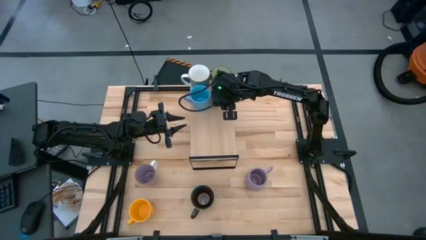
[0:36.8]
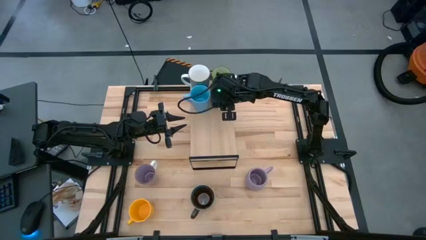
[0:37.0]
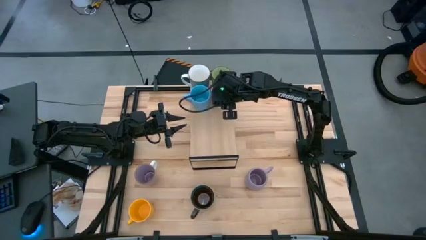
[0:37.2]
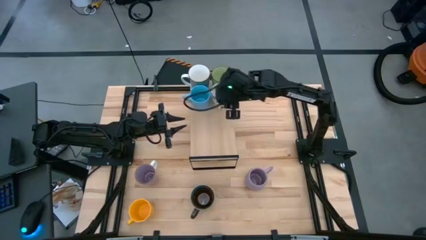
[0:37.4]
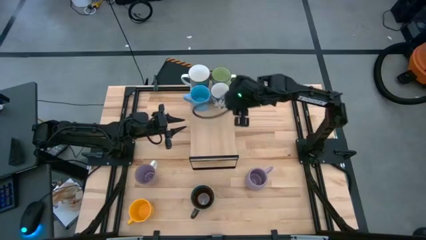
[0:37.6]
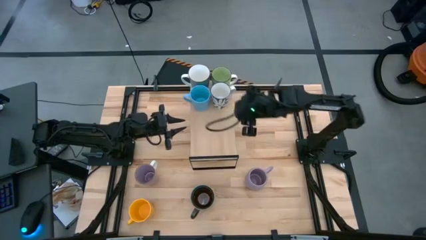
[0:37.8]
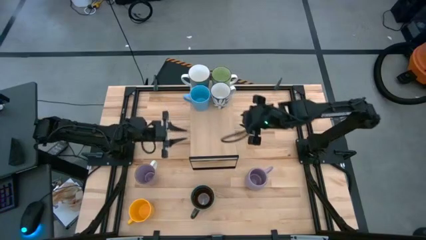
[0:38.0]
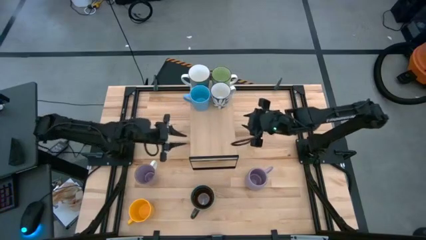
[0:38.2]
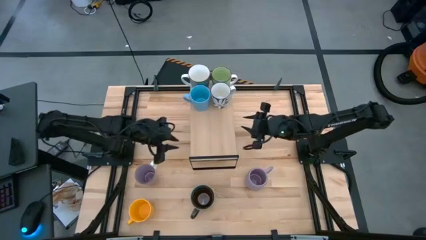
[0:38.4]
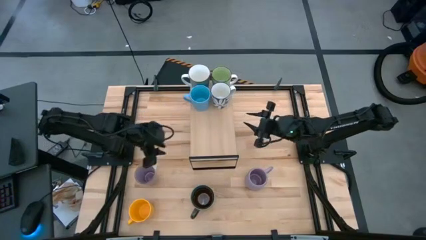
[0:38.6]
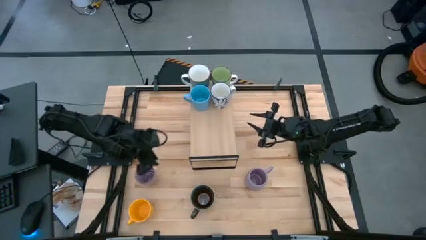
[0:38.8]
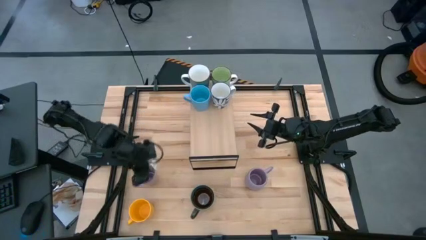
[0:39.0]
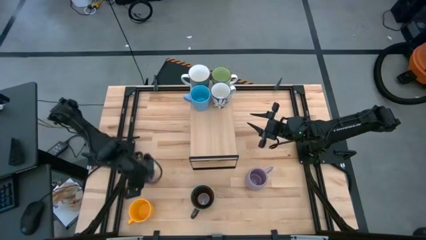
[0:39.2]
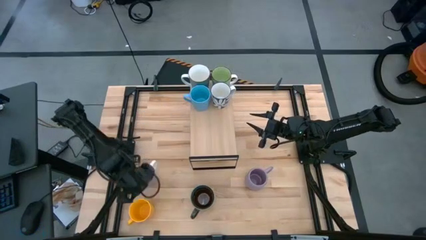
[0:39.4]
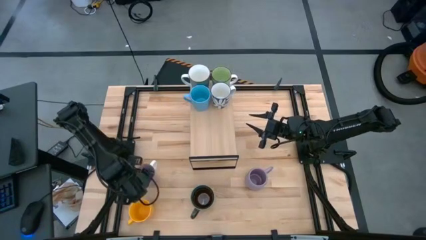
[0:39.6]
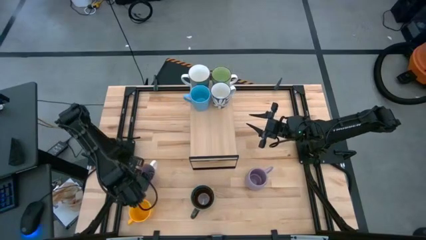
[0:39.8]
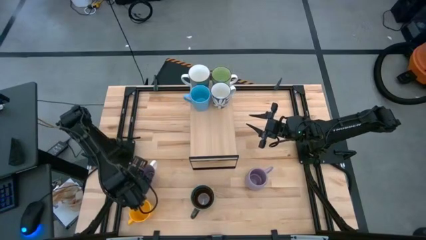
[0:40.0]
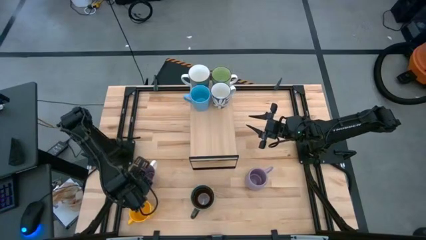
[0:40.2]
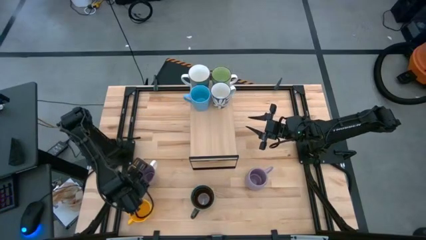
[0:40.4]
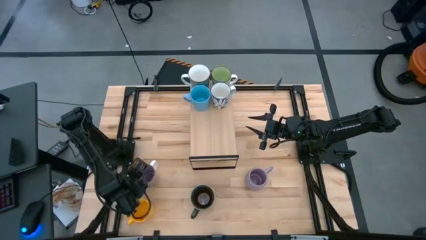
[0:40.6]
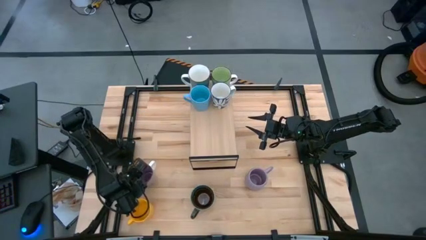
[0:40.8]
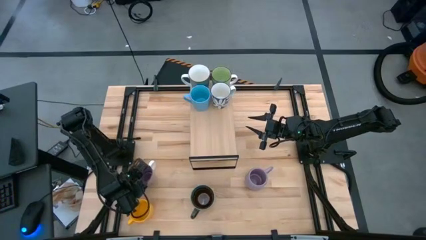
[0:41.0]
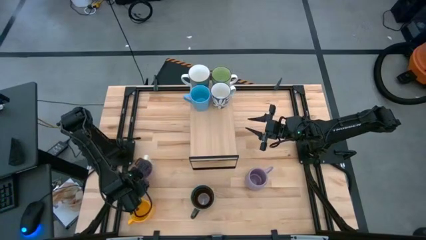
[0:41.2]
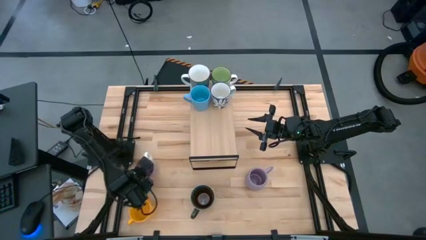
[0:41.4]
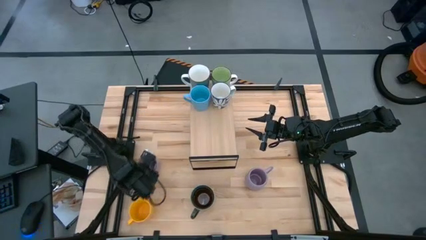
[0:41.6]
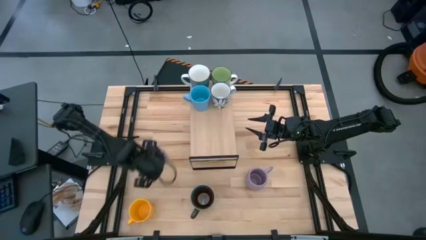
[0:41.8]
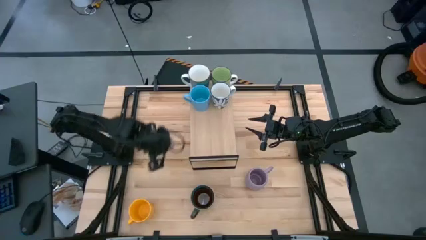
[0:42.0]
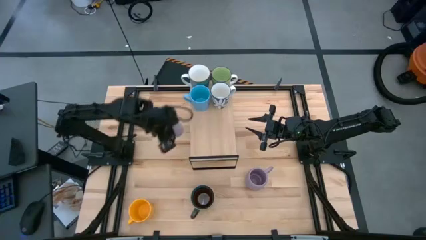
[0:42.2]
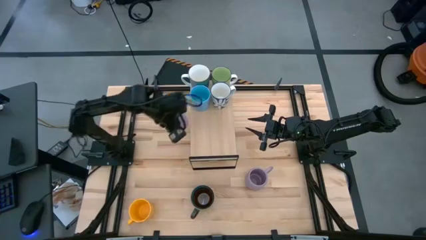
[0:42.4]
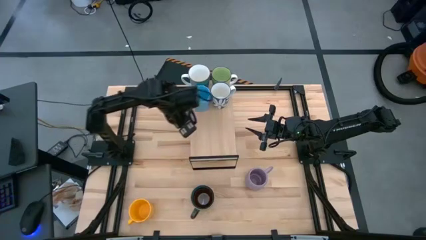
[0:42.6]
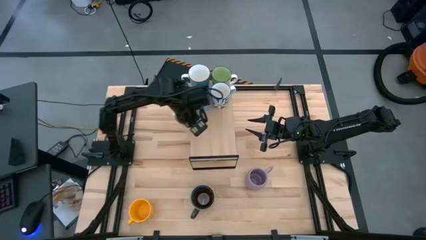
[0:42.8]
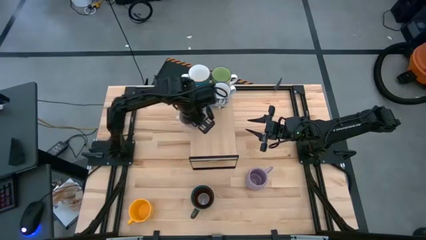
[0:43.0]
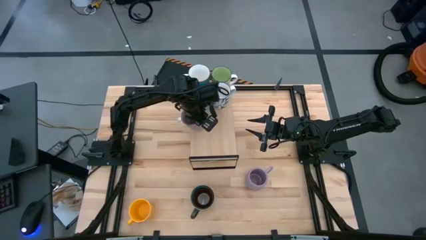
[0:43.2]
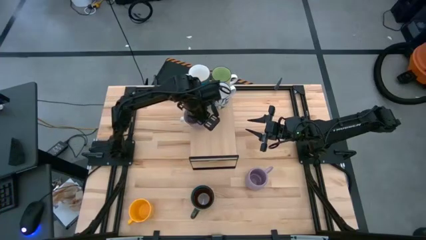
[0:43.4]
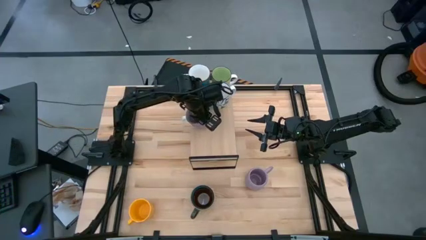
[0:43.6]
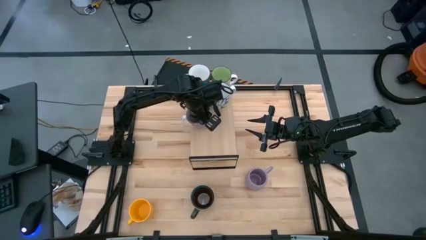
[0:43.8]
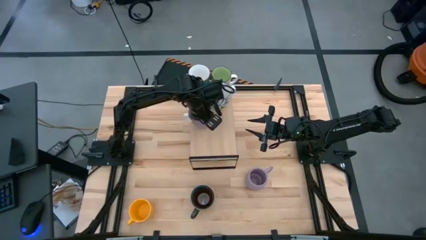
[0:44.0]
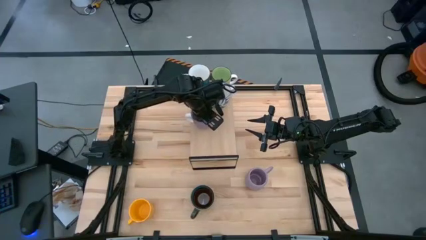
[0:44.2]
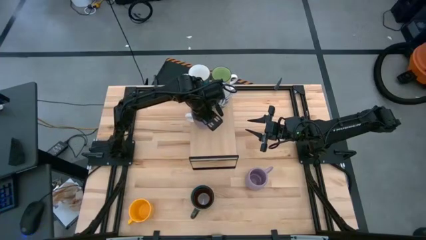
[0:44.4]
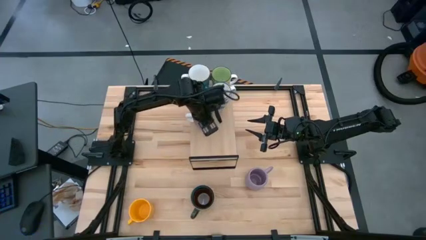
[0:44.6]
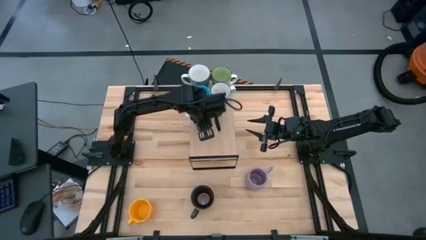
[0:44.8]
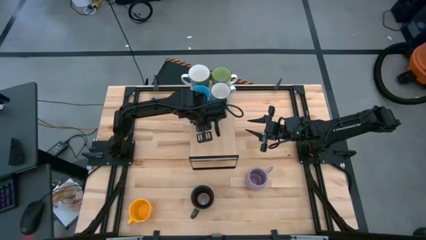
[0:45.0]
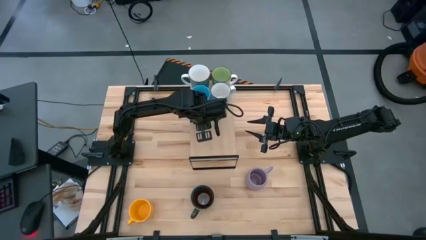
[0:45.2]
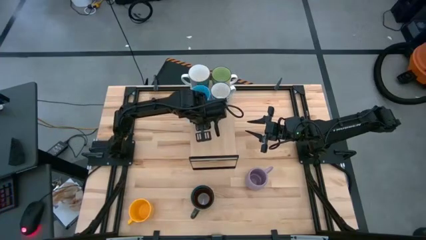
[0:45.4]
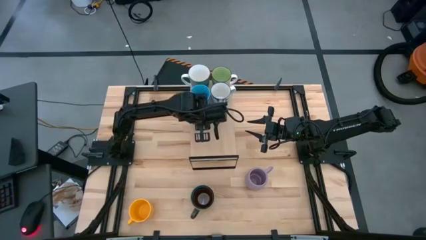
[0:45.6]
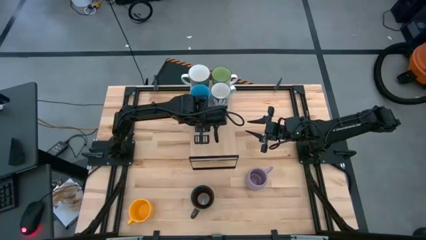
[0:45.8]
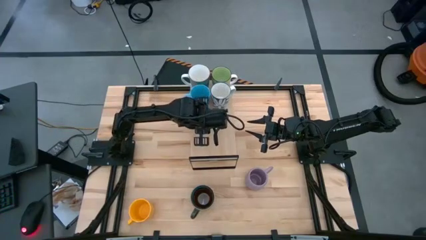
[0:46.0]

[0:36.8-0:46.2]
Task: Place coffee mugs
Put the left purple mug on the shelf

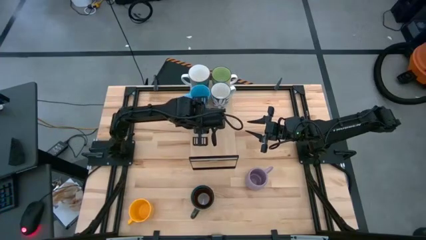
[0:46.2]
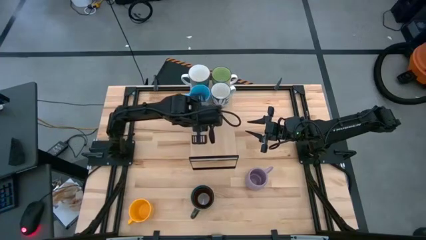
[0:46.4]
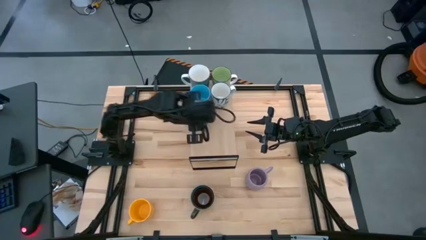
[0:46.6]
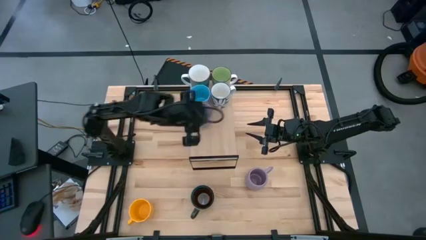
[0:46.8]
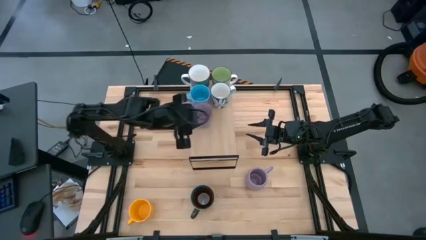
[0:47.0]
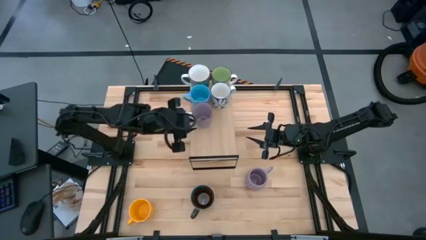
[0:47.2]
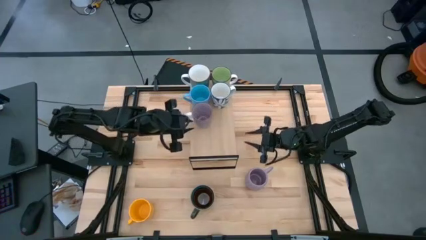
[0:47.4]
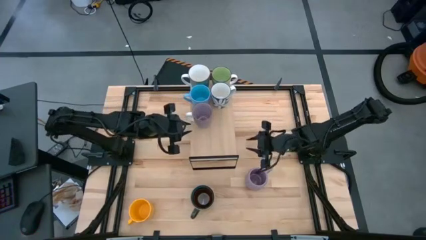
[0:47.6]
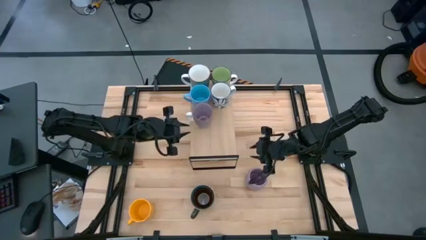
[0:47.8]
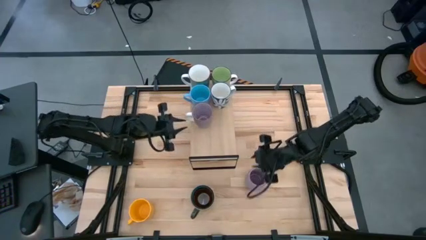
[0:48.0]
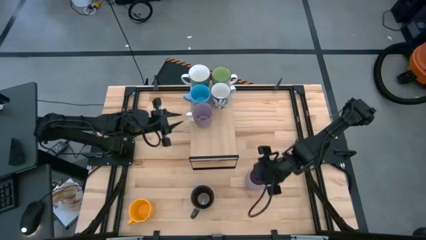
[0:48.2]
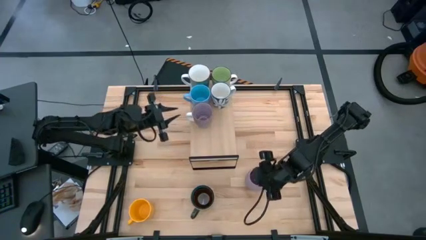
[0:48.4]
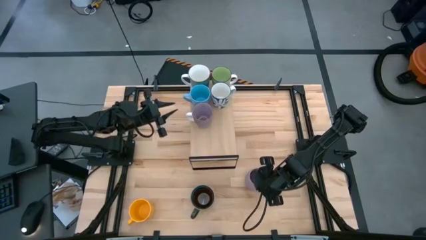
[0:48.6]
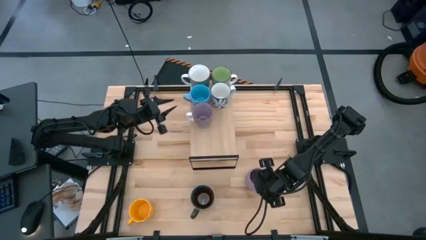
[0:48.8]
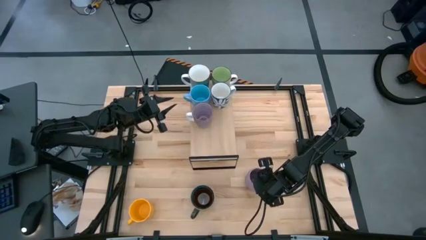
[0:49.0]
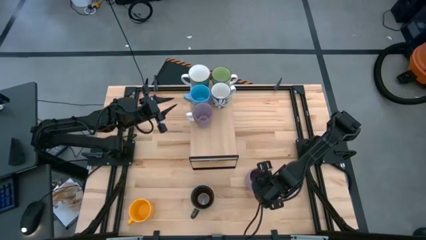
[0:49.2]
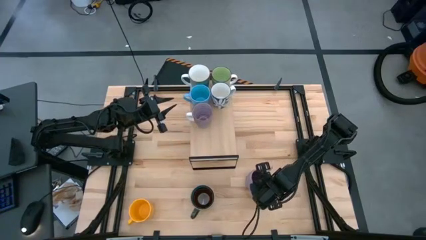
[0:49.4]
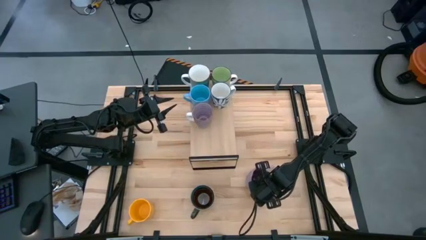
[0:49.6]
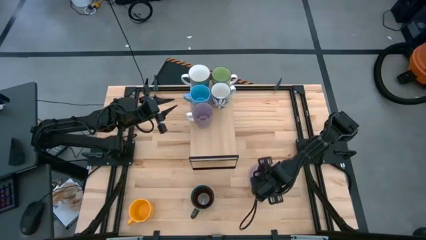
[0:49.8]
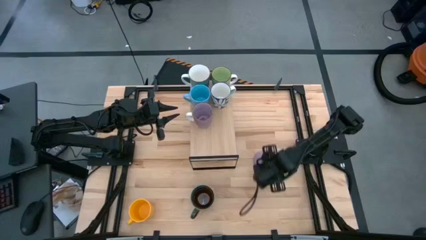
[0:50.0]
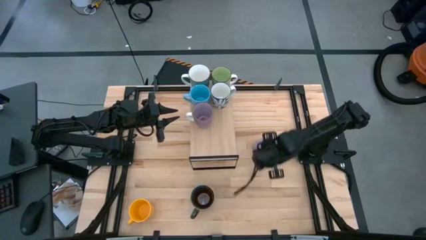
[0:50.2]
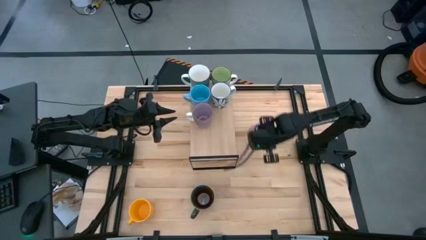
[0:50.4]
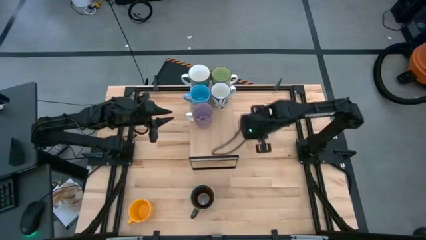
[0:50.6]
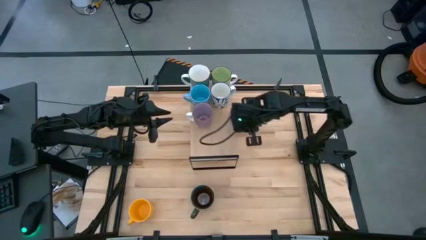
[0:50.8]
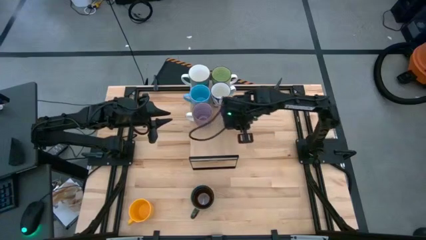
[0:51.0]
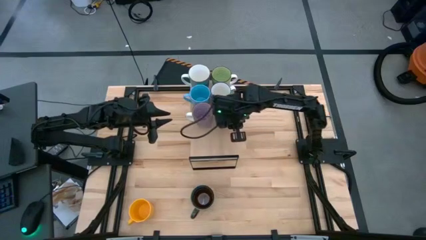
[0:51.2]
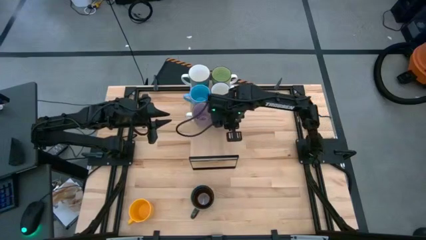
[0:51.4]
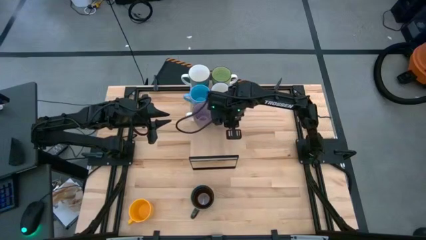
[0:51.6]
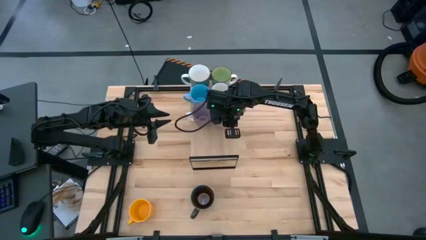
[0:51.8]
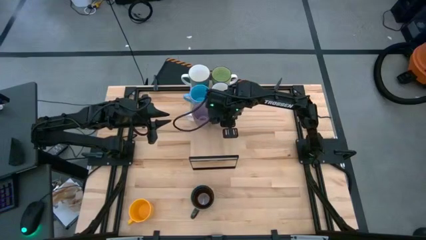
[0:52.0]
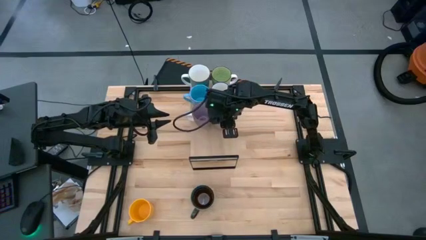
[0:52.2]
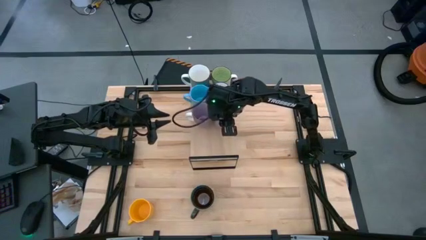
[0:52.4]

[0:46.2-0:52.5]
Put the purple mug aligned with the other purple mug on the shelf
